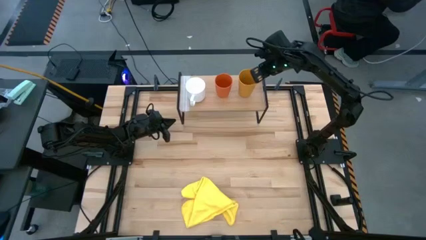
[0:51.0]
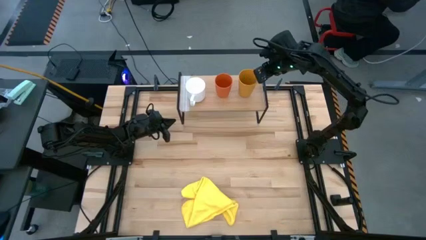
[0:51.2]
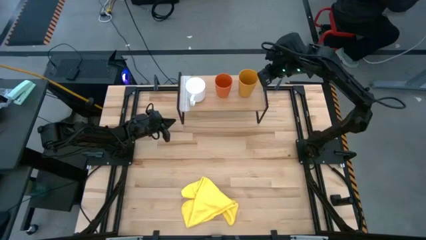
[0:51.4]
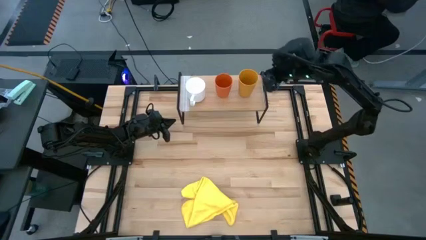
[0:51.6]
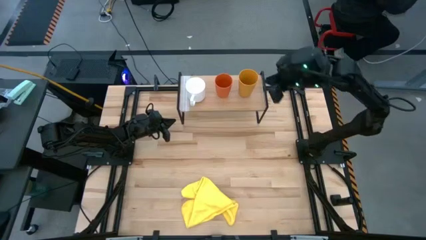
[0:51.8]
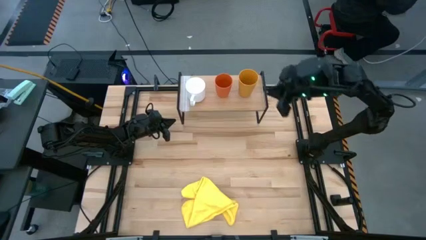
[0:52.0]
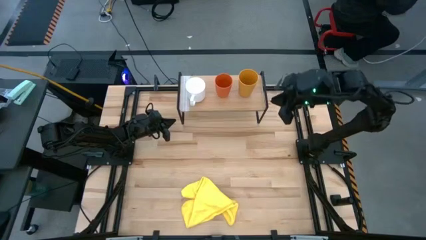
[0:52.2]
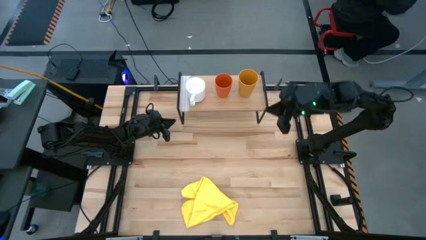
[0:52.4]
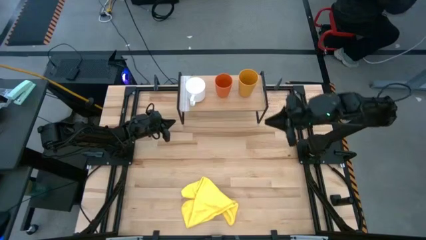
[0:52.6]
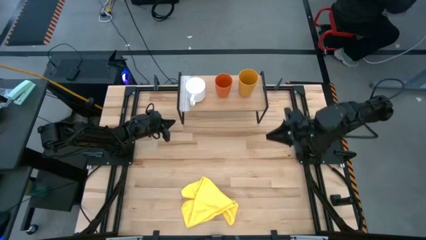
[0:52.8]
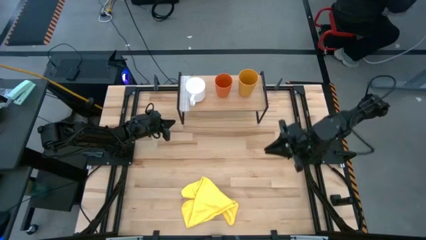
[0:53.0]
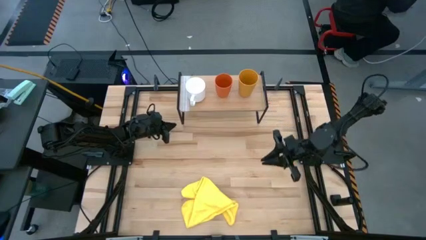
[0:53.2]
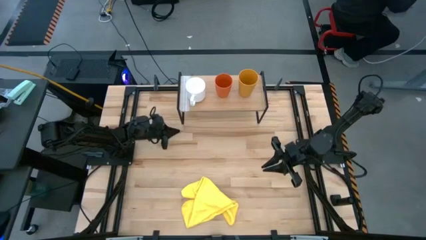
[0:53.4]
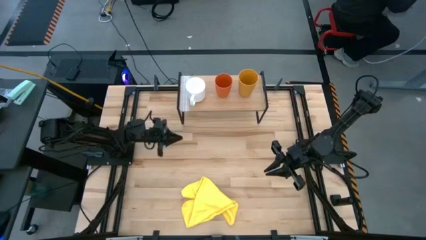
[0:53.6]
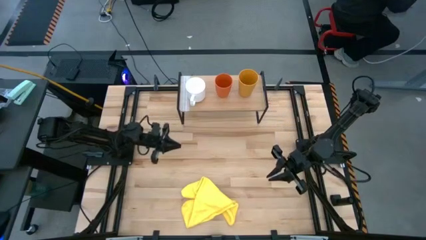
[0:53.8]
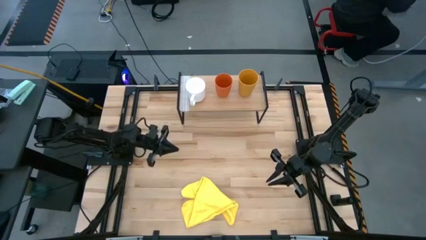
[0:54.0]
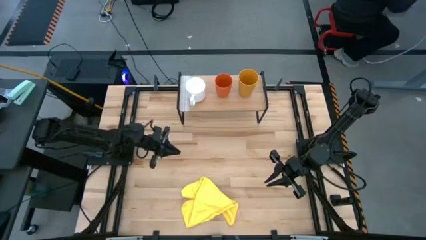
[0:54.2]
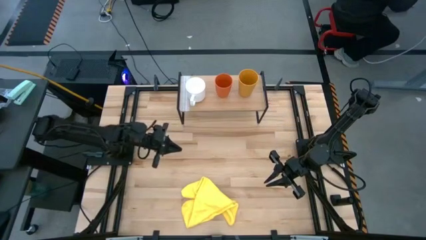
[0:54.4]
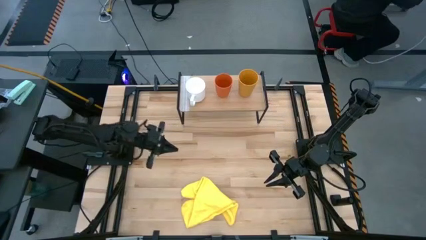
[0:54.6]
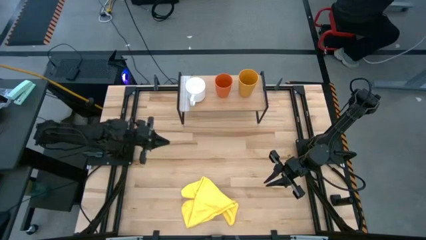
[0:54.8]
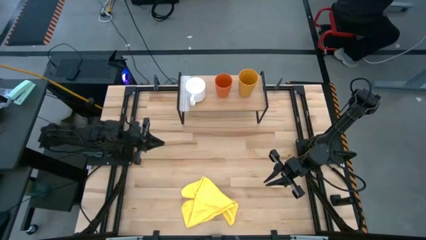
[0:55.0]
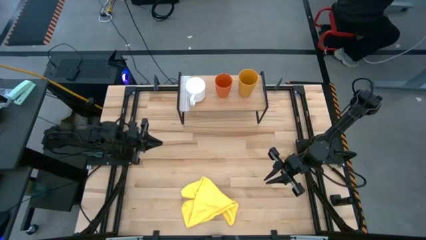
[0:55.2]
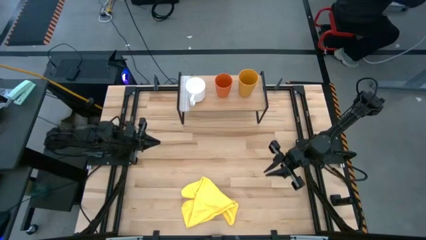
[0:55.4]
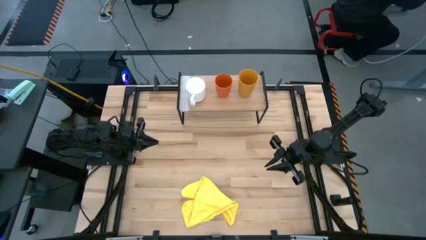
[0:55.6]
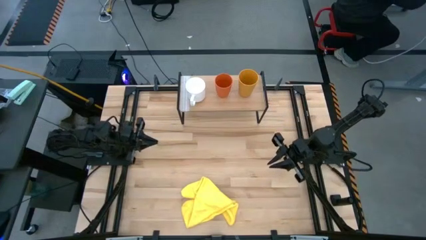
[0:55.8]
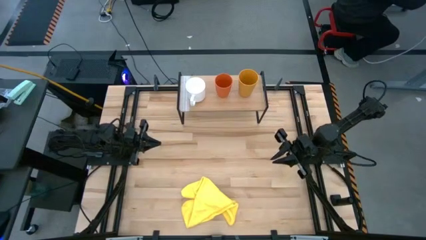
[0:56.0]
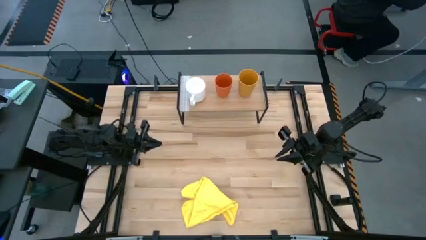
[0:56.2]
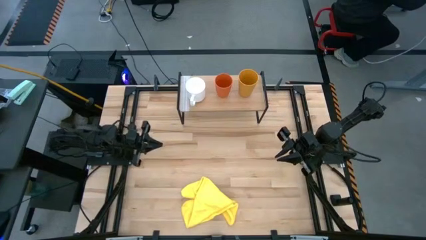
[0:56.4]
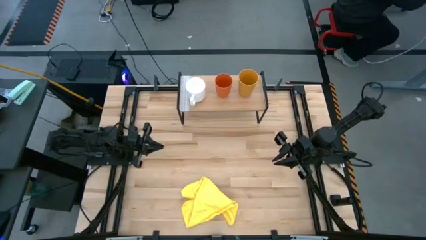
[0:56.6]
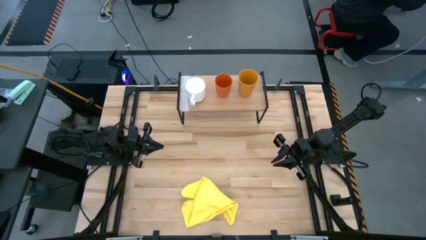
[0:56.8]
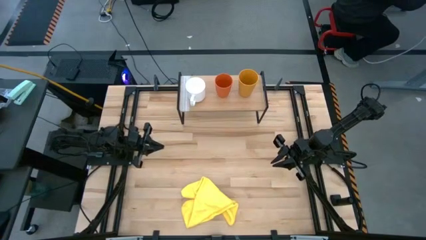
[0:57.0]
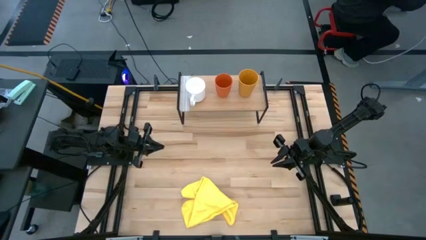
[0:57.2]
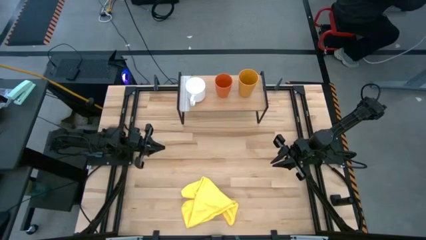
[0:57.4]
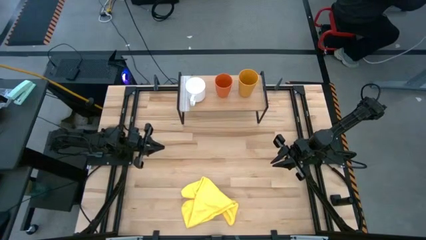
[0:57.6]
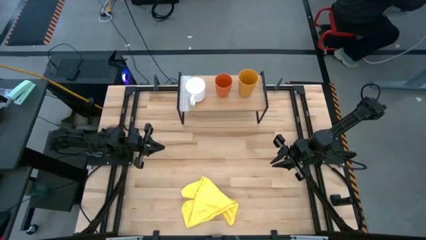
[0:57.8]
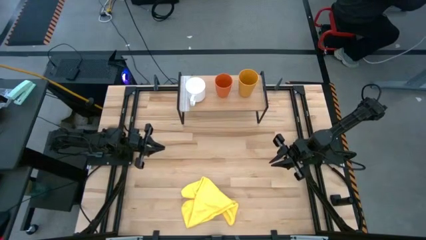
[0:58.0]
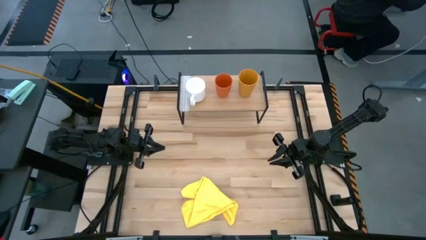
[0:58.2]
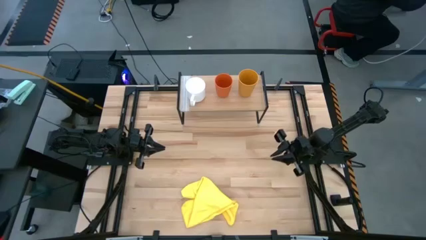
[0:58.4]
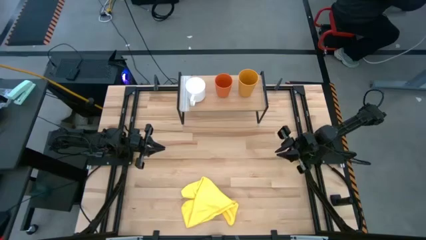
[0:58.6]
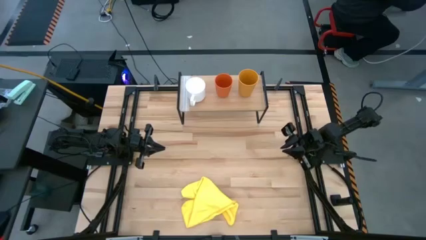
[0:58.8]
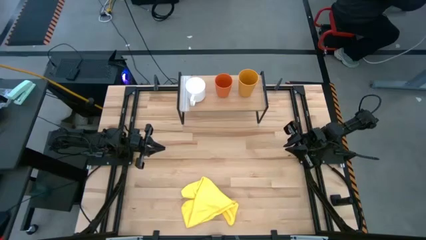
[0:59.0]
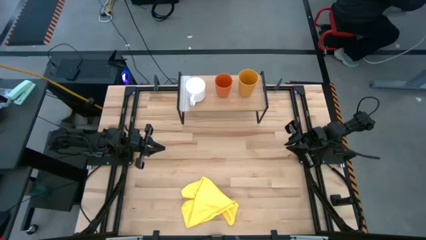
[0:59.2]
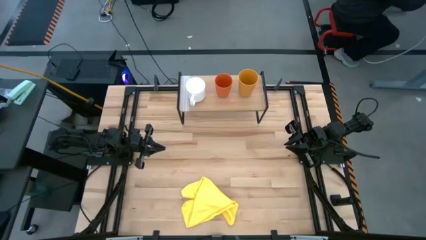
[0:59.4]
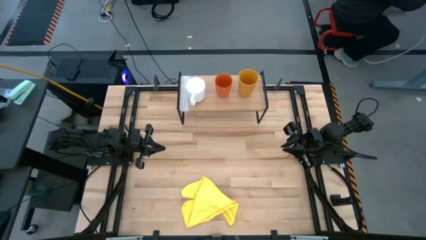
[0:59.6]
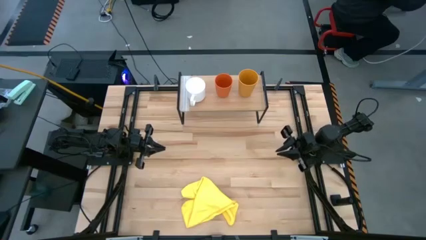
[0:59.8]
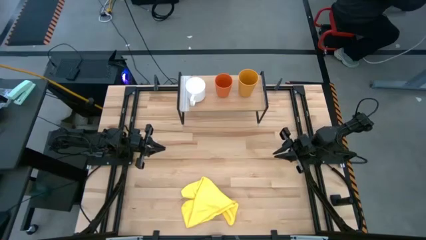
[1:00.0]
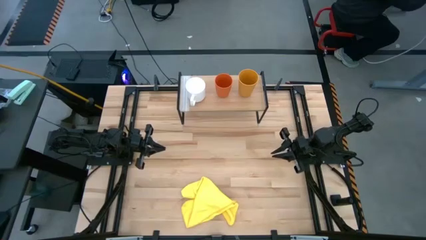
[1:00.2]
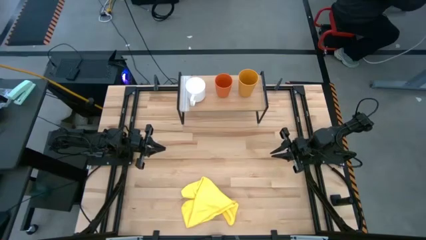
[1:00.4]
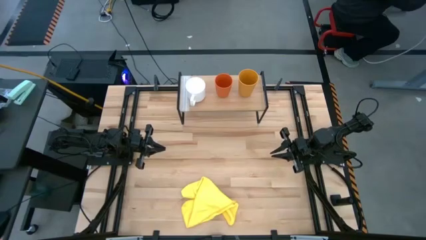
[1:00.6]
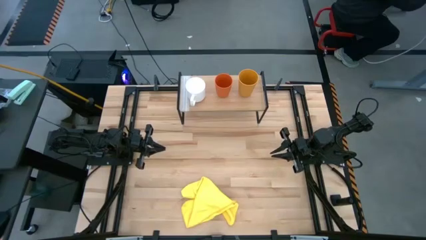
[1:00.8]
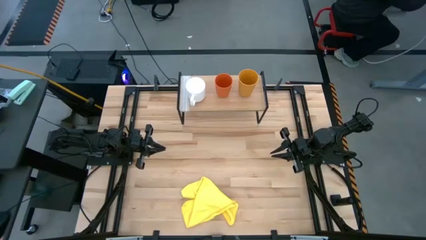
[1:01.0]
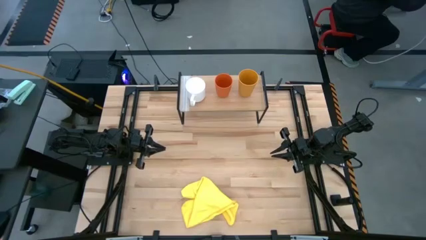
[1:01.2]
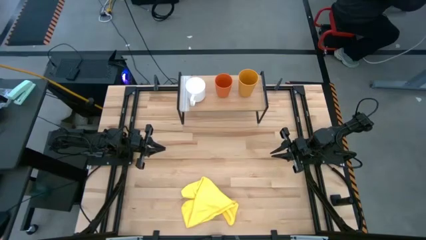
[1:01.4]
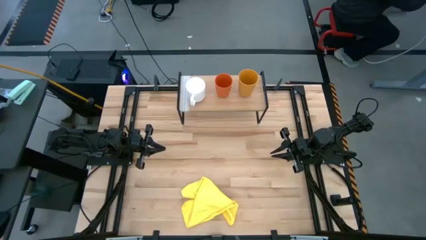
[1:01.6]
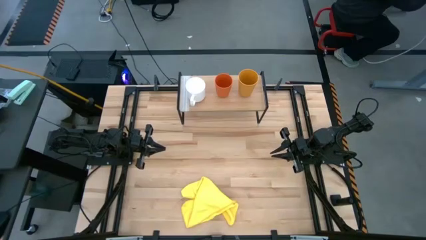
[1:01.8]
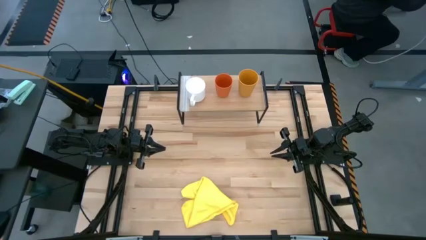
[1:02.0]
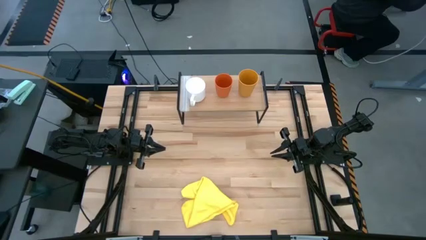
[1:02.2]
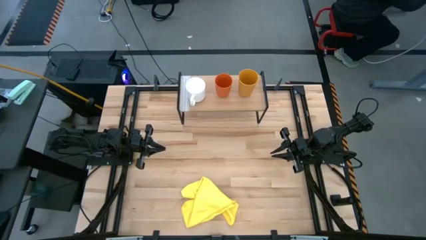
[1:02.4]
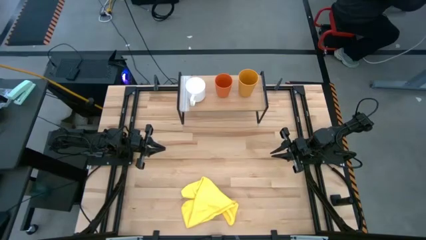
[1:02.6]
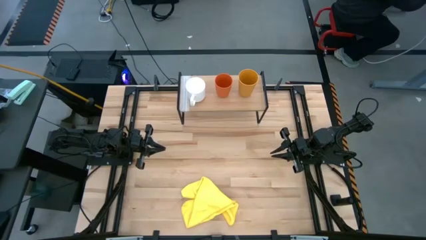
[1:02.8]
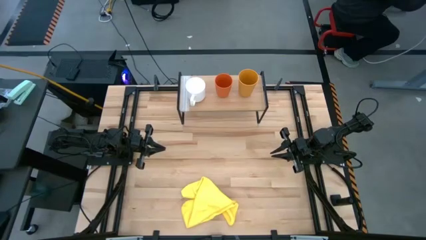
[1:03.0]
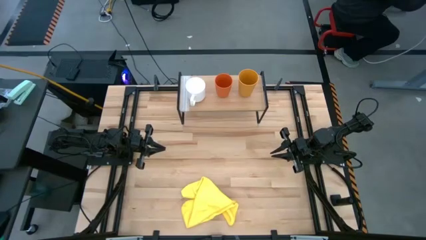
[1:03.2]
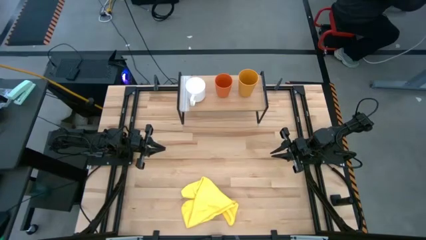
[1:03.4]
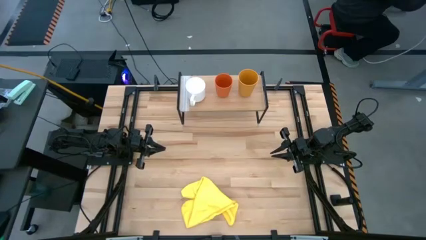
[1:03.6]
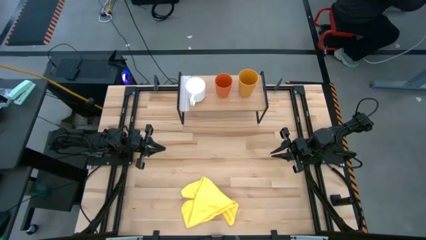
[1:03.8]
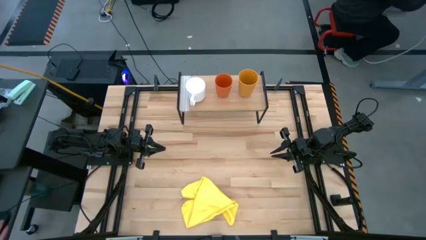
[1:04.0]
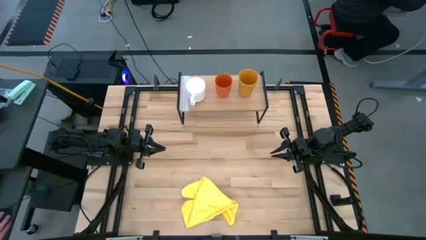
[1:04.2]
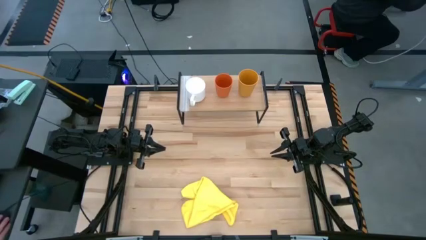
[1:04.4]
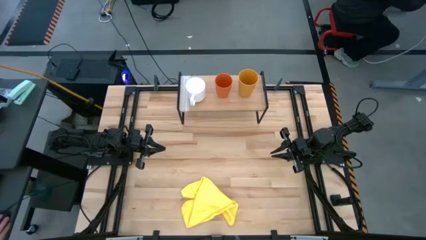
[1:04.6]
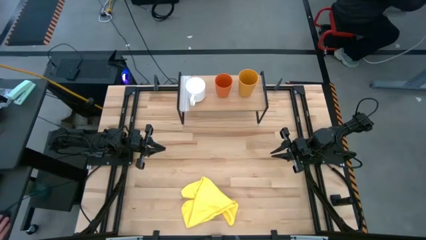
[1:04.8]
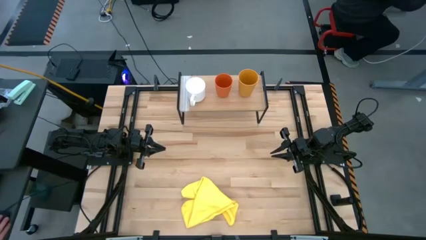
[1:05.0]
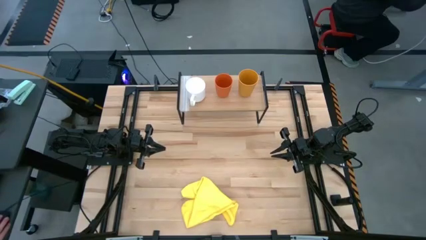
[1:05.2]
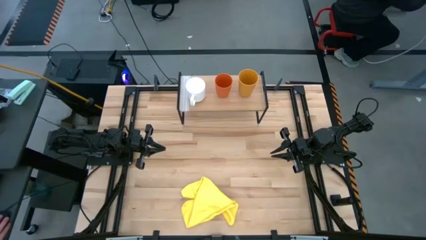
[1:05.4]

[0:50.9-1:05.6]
Task: Stack small to large cups/mugs on shelf
Return to Home Position

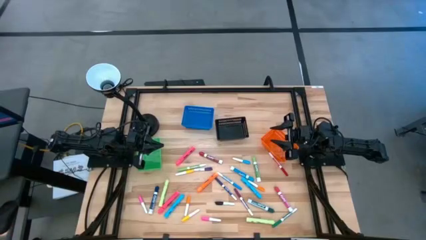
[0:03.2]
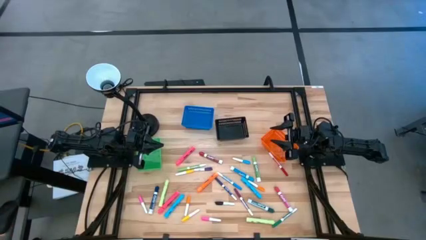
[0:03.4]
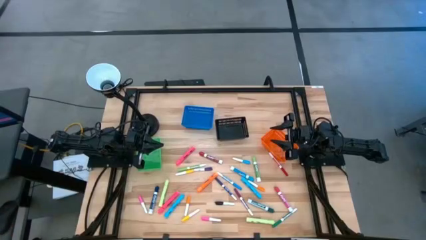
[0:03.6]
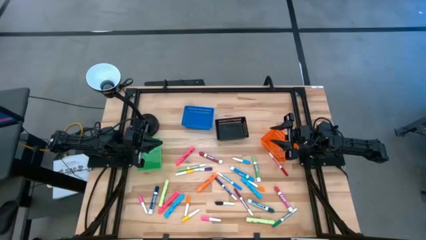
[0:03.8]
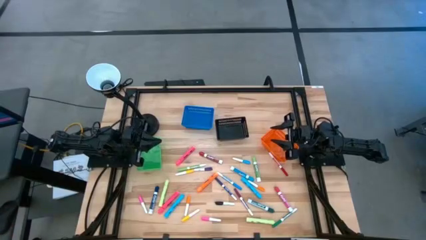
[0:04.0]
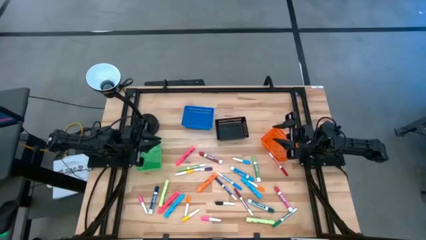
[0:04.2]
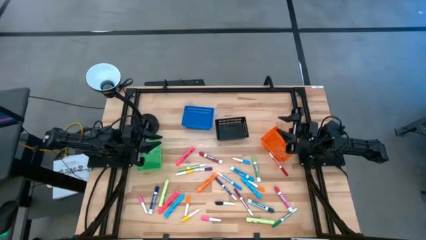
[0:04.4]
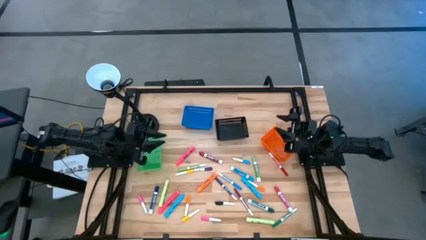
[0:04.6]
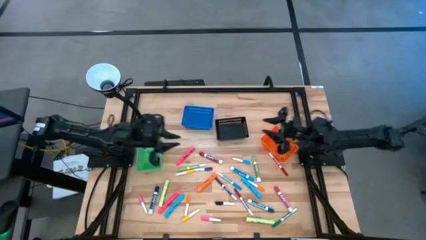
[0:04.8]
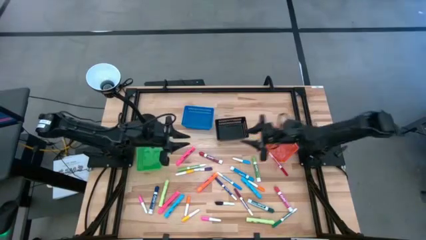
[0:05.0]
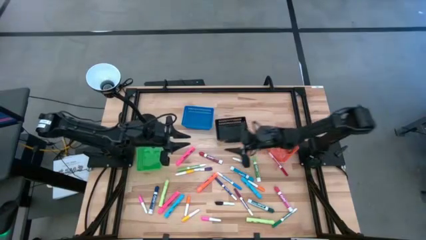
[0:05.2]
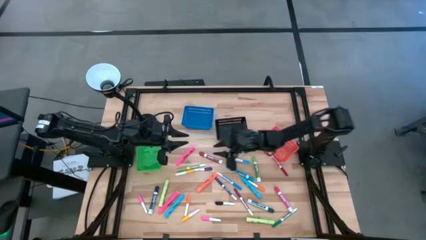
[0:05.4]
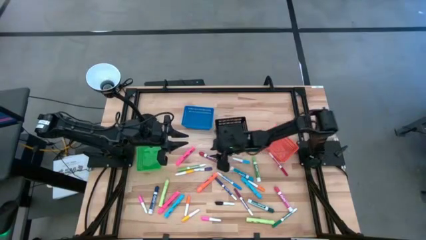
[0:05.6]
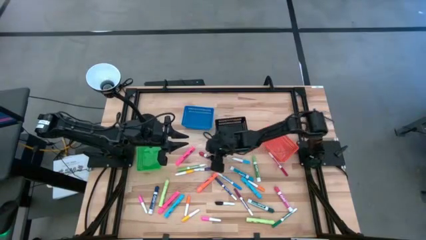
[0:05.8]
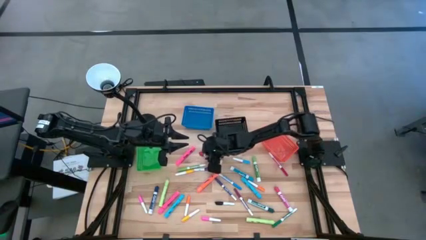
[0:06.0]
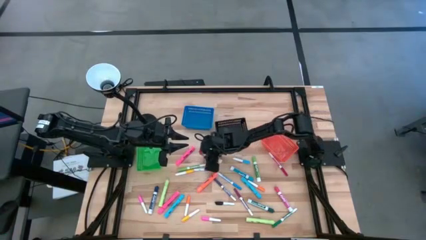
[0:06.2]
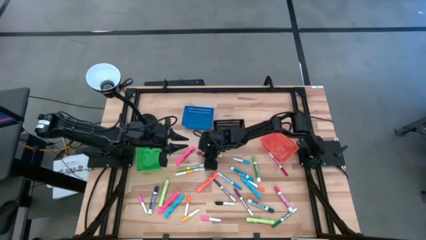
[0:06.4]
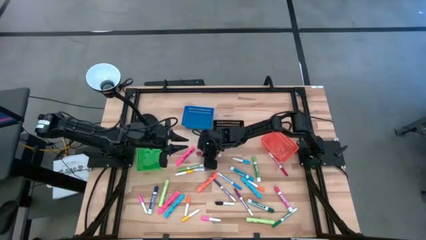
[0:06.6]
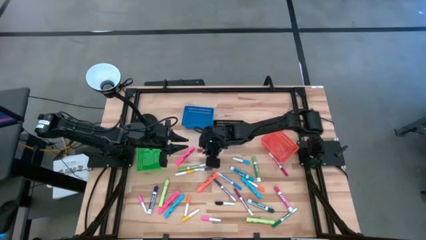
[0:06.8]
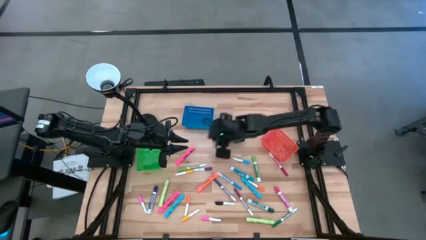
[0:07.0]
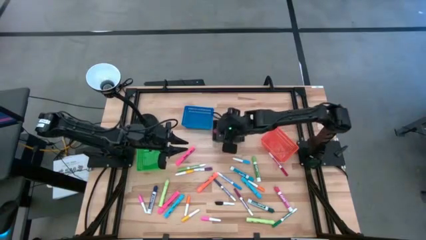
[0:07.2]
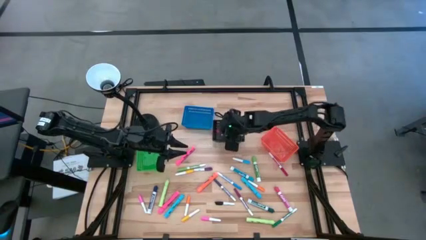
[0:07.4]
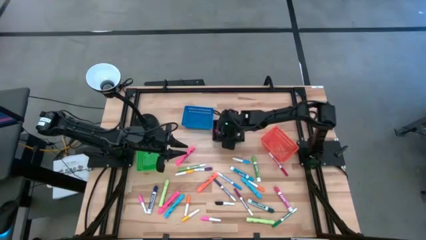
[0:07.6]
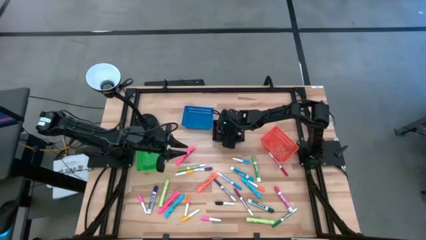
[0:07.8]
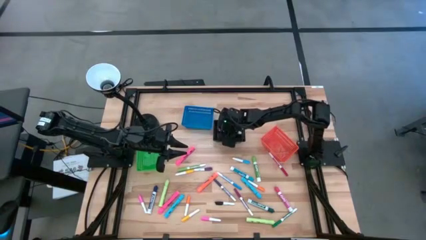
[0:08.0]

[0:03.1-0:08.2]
Task: Pick & Place Markers
Put the red marker pen into the black basket
